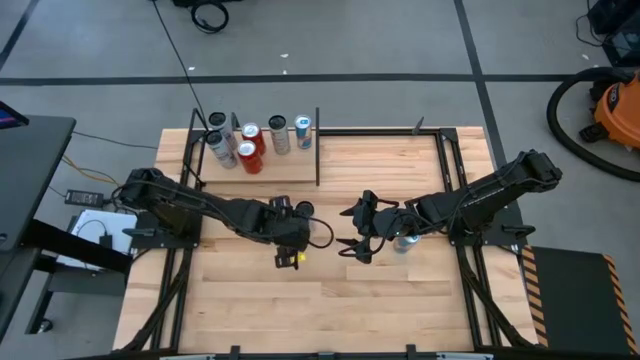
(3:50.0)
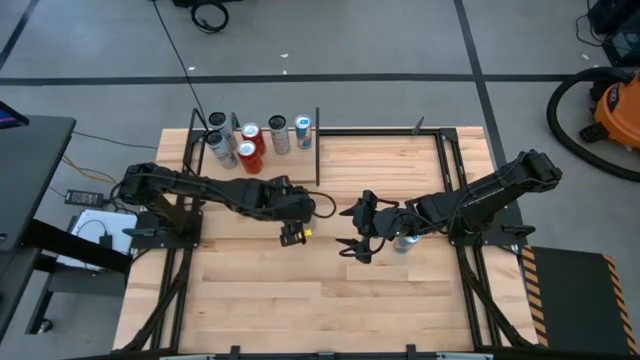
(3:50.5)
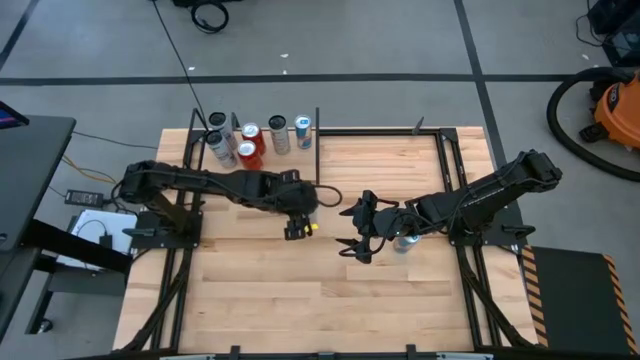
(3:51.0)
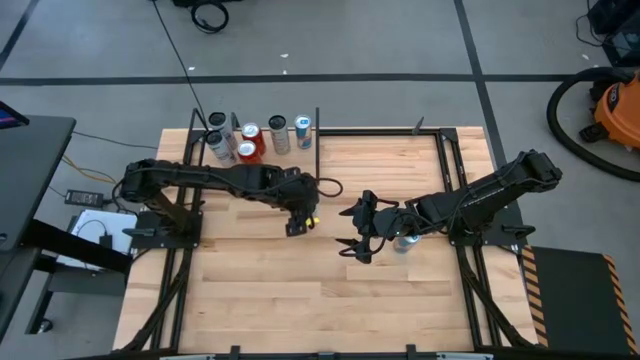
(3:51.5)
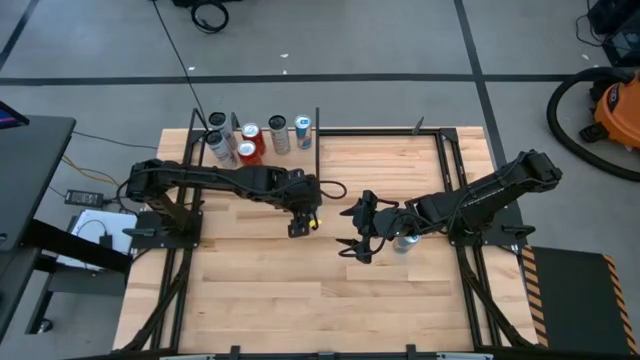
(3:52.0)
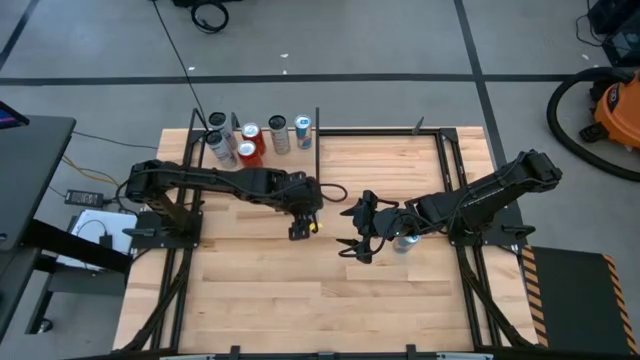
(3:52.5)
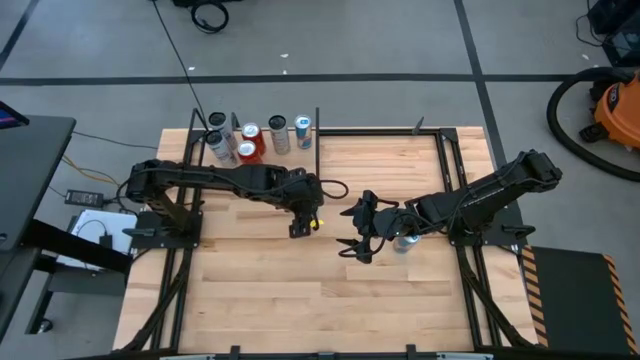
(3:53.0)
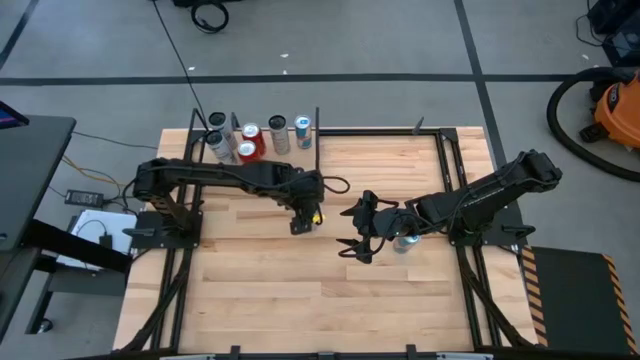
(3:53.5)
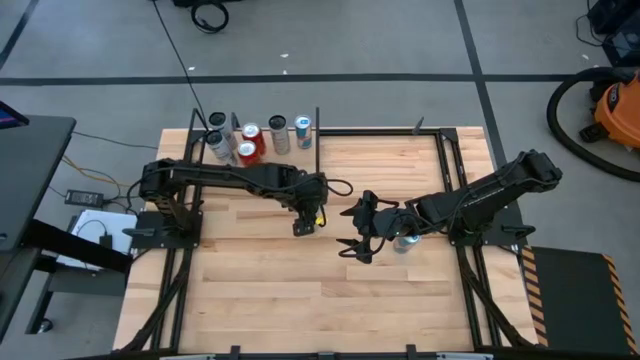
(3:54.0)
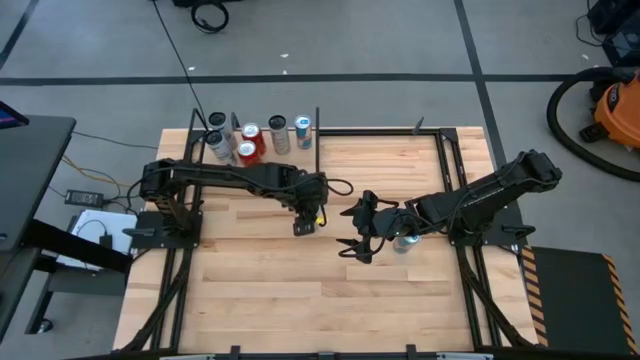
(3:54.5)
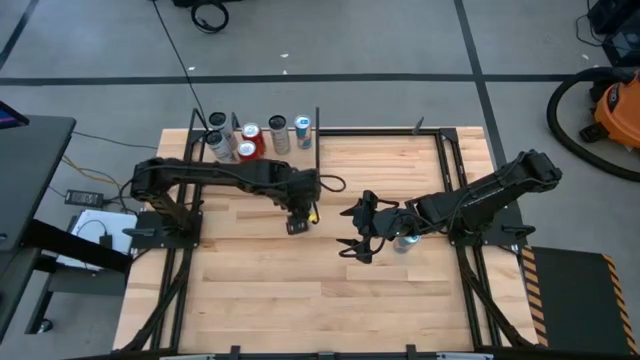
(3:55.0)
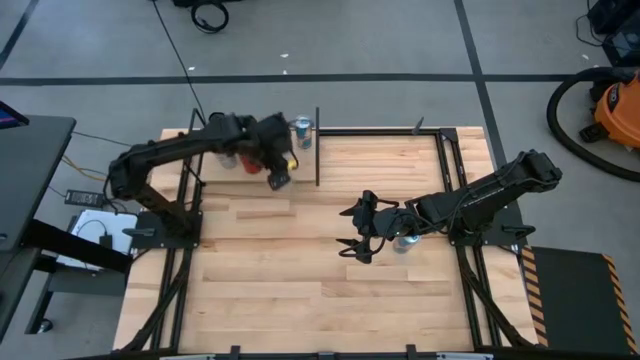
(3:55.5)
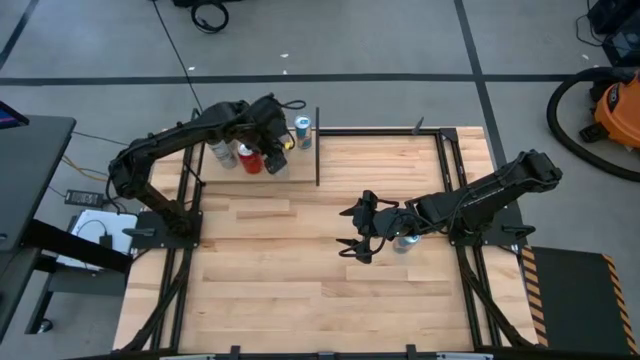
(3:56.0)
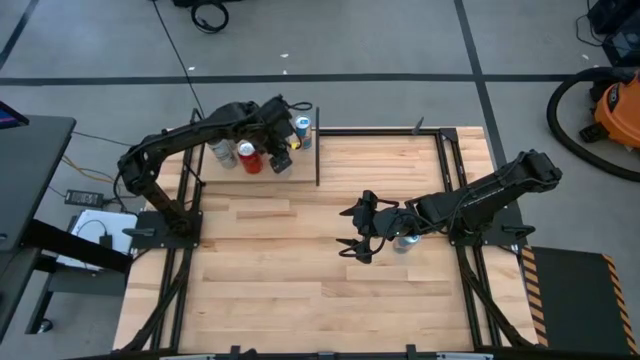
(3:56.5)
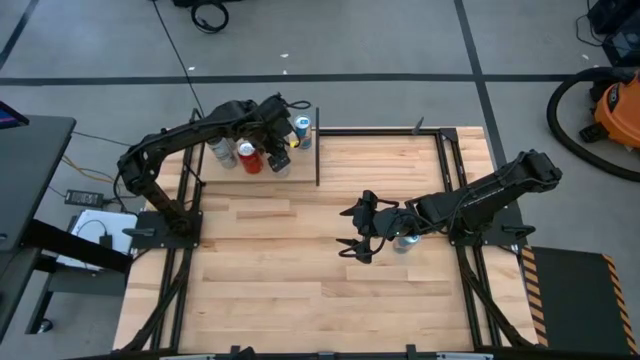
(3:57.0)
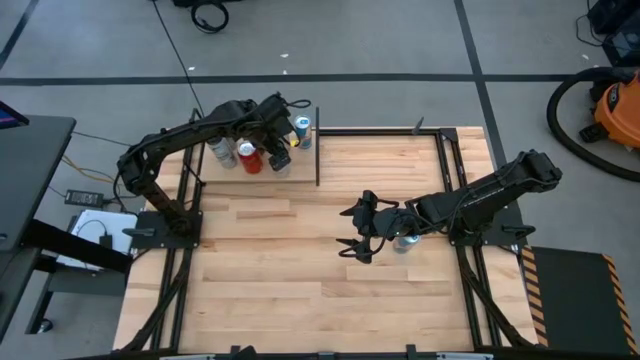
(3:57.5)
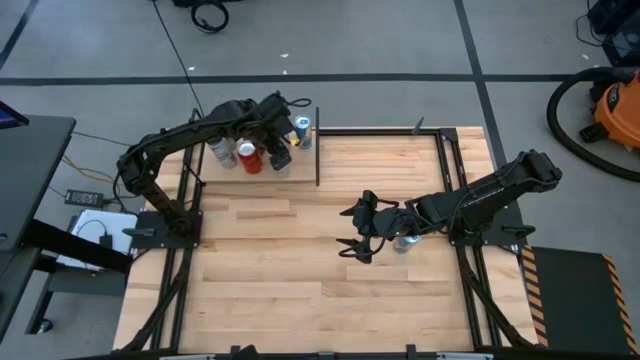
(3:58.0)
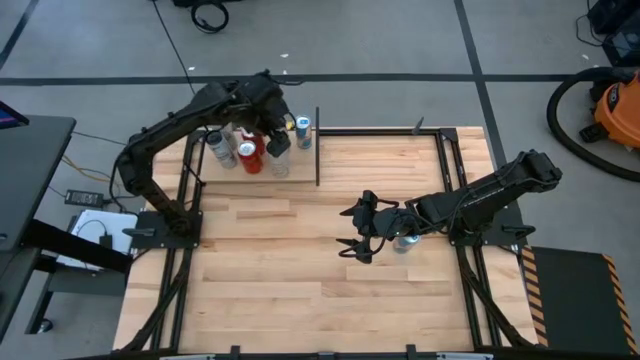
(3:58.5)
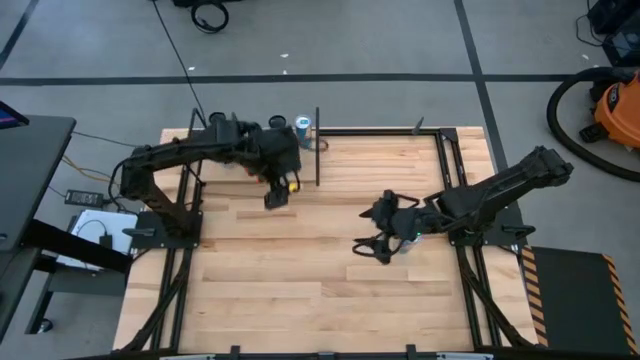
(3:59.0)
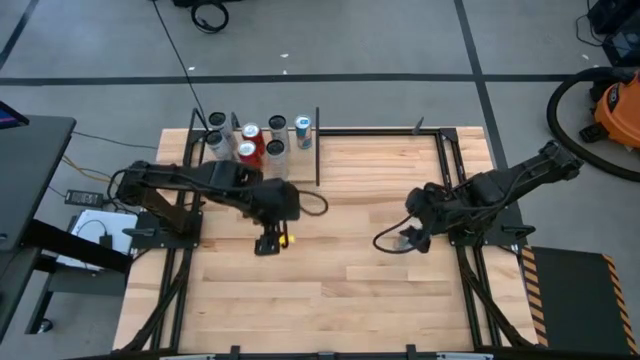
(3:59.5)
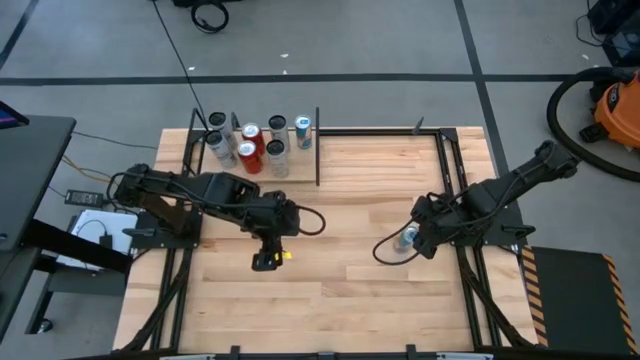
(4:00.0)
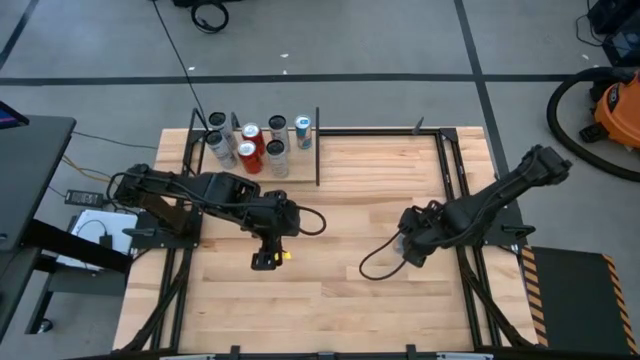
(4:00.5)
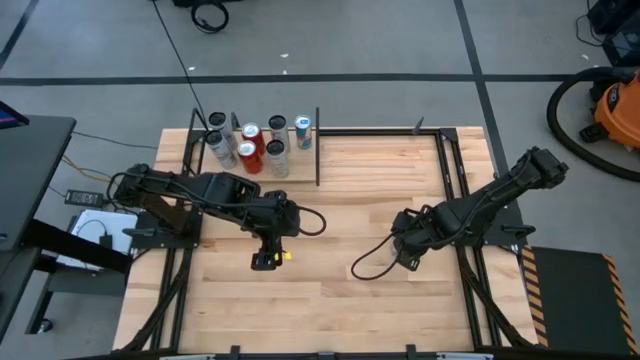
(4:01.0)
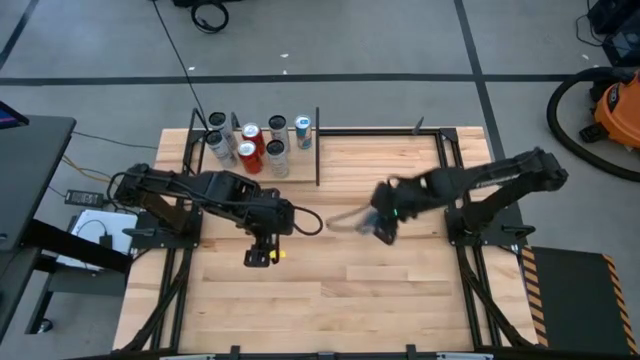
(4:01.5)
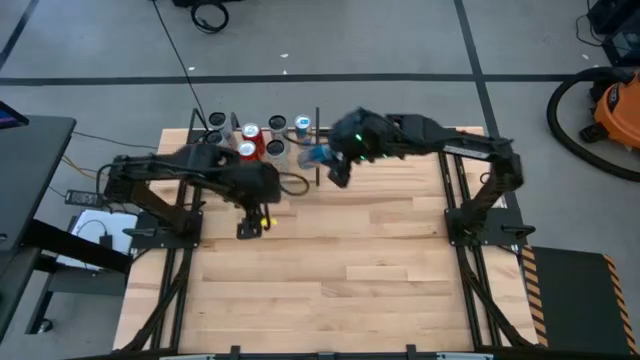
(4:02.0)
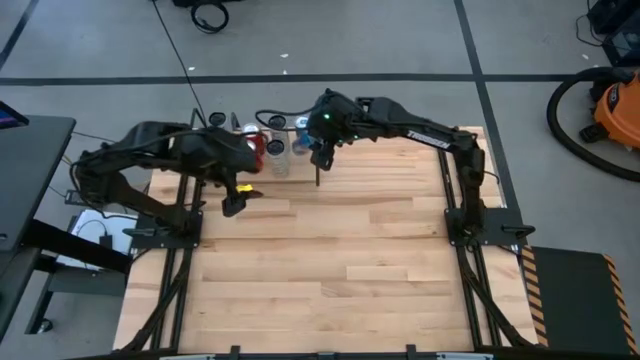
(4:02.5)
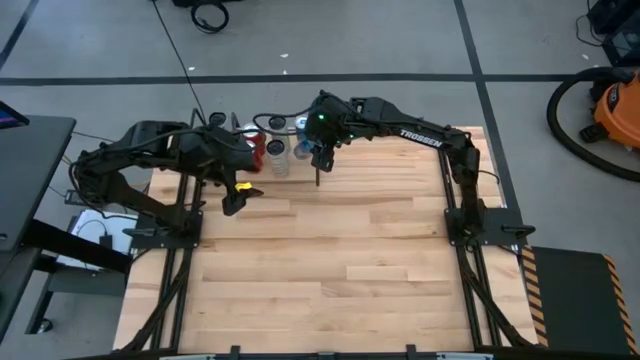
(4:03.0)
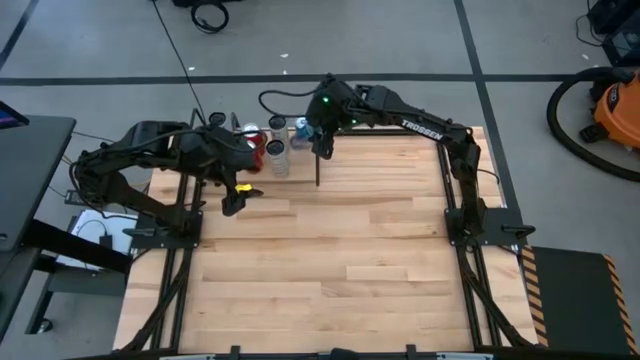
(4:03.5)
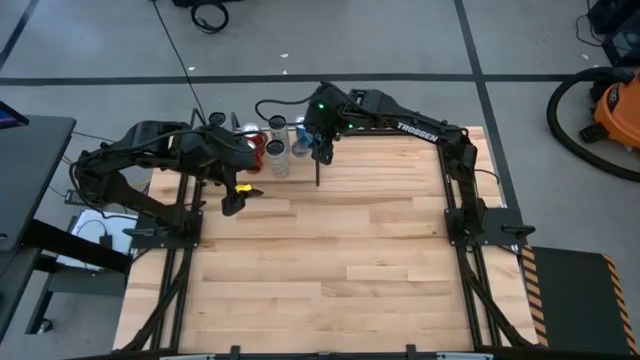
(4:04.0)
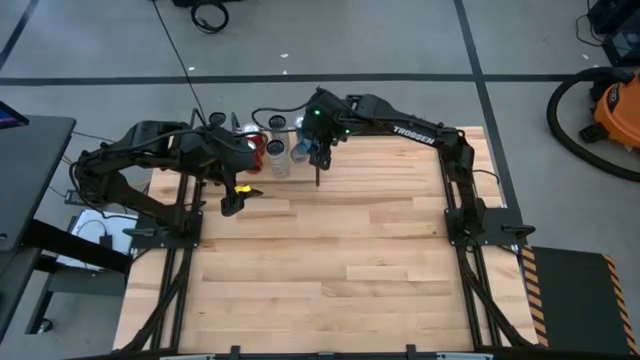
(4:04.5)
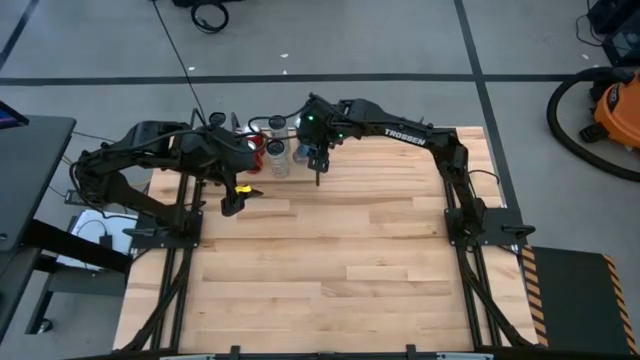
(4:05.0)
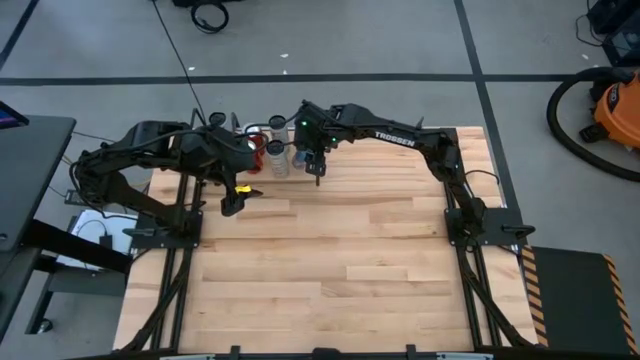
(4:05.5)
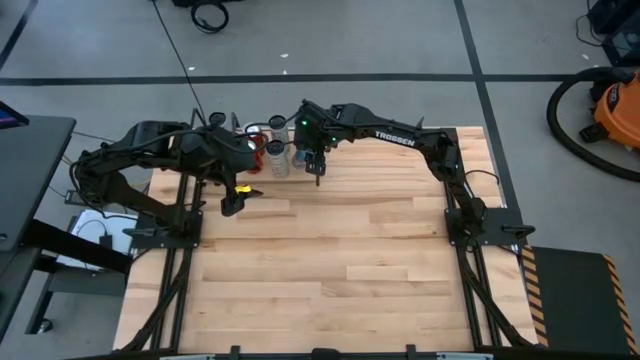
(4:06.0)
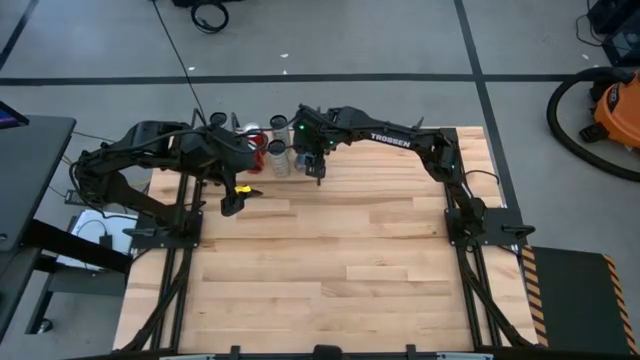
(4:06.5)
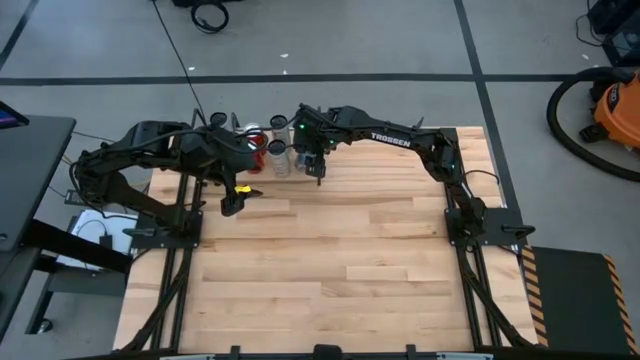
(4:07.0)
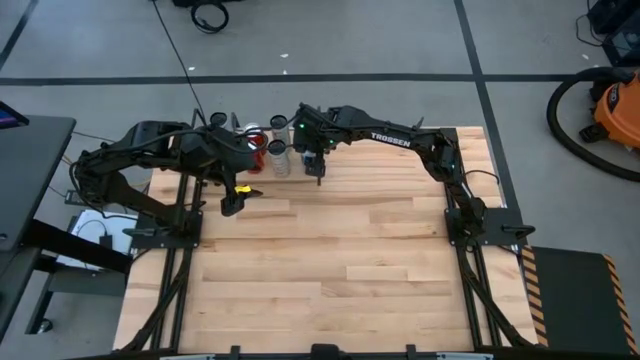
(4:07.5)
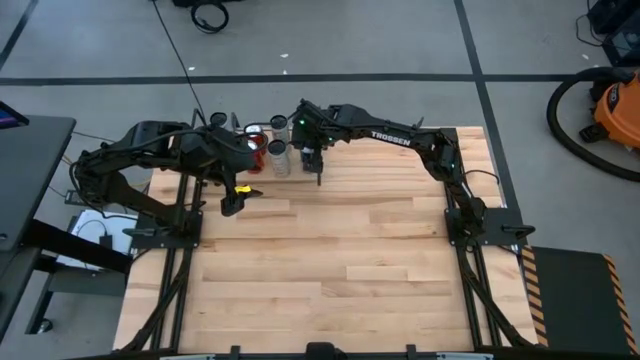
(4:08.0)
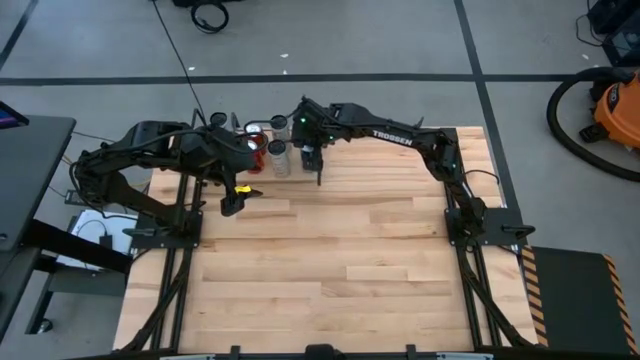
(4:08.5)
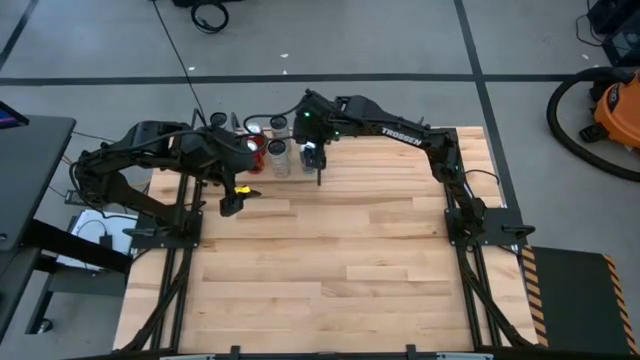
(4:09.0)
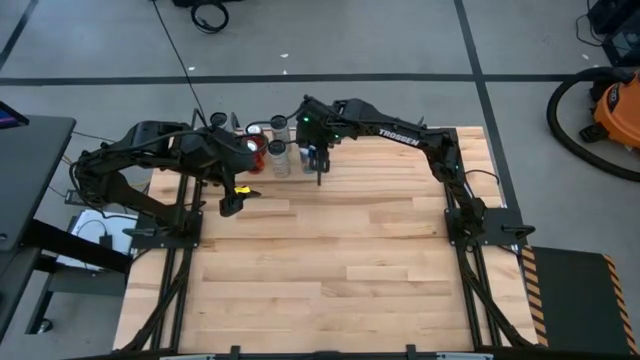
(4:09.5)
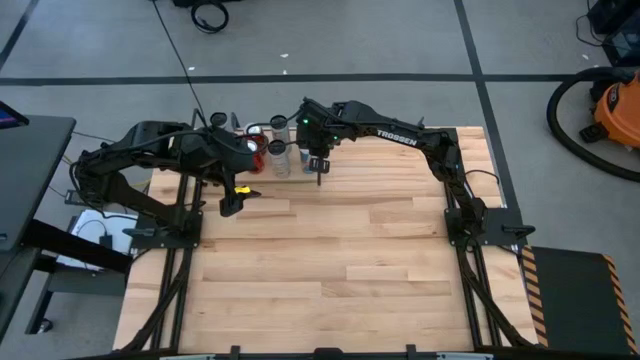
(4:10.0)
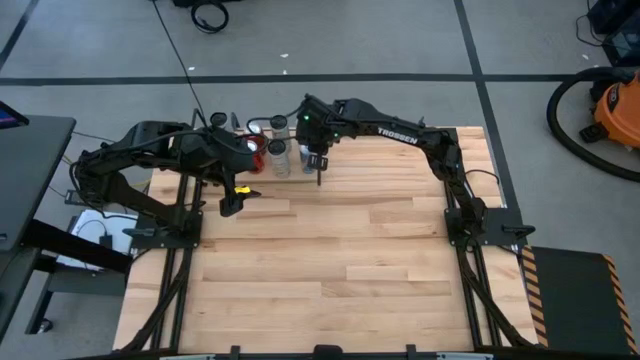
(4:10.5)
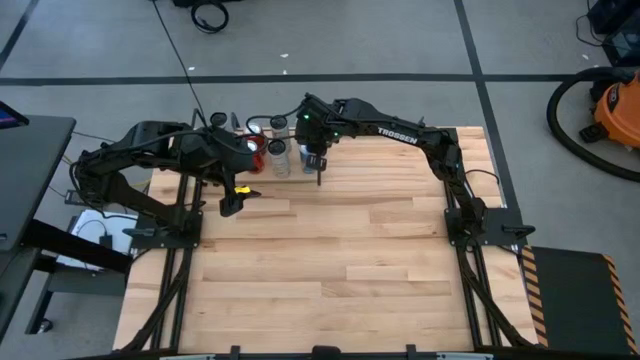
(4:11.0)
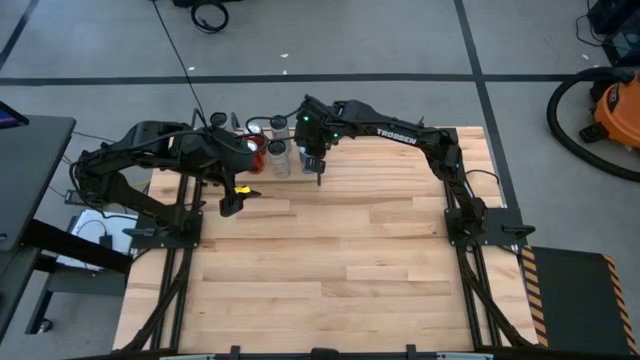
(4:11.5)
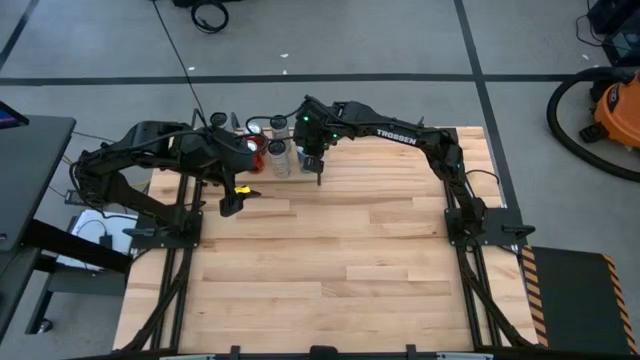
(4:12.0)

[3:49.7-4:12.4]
Task: Place canned beverage on shelf
Put the white-yellow soda can on the shelf aligned with the other white-yellow soda can
